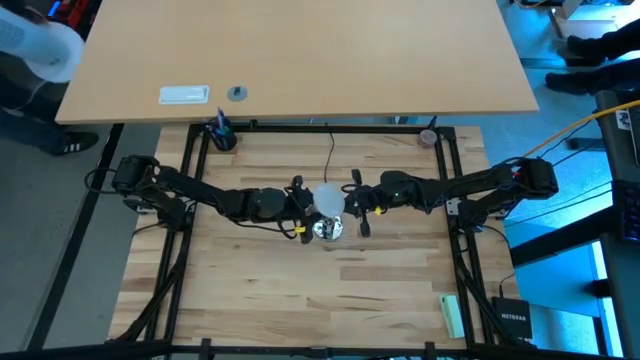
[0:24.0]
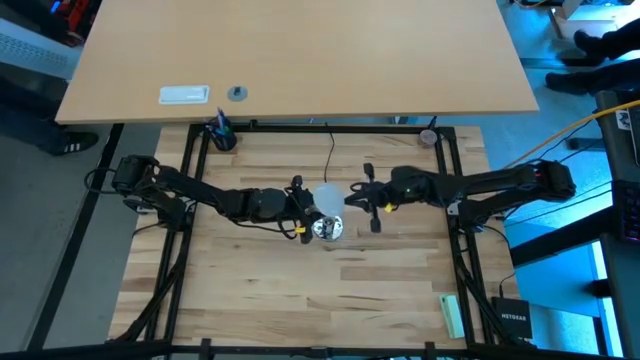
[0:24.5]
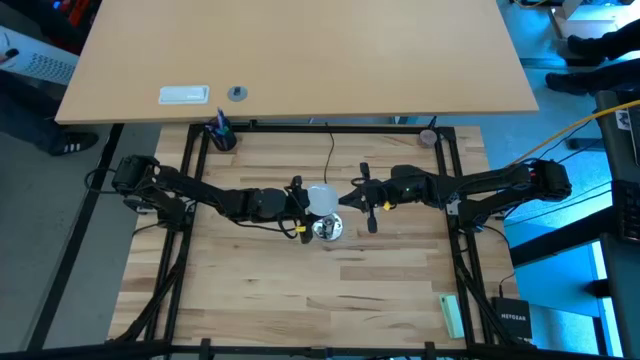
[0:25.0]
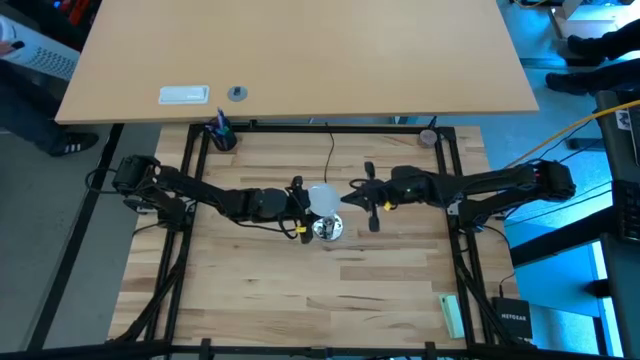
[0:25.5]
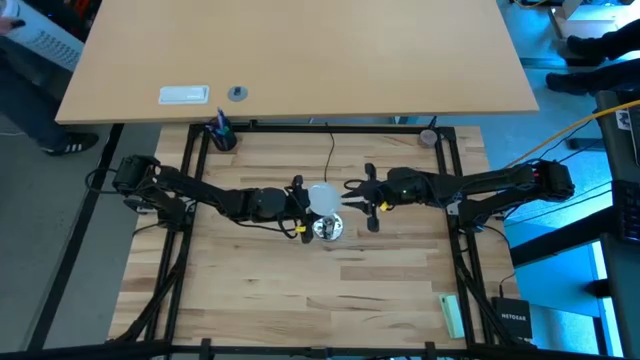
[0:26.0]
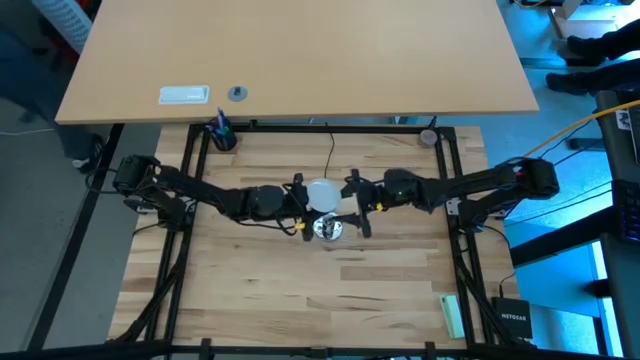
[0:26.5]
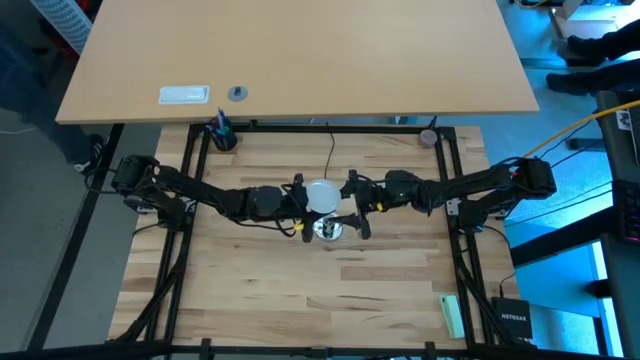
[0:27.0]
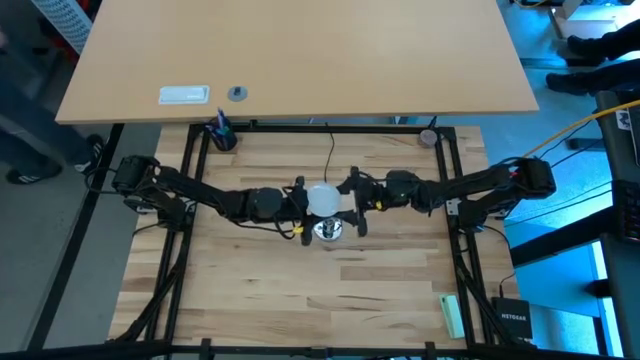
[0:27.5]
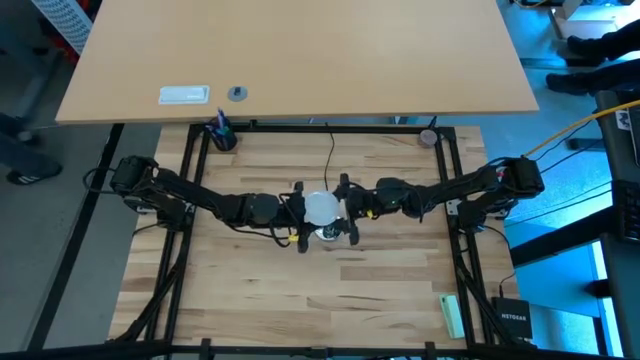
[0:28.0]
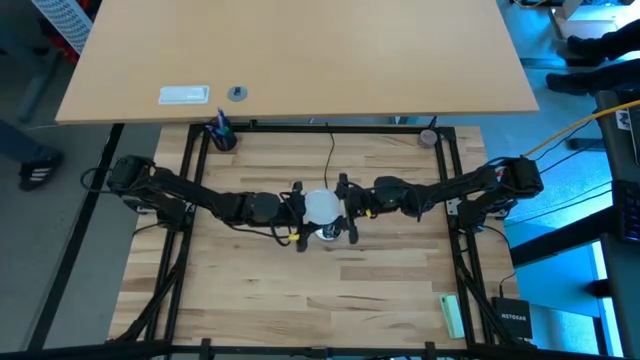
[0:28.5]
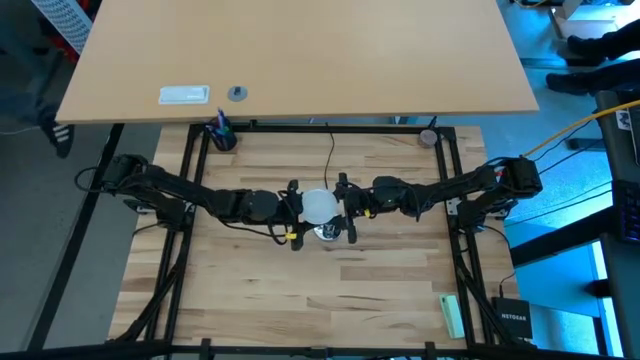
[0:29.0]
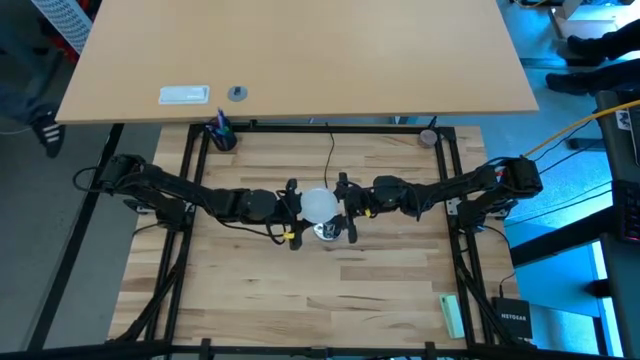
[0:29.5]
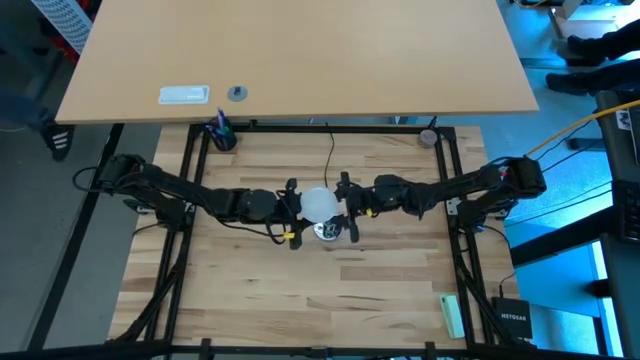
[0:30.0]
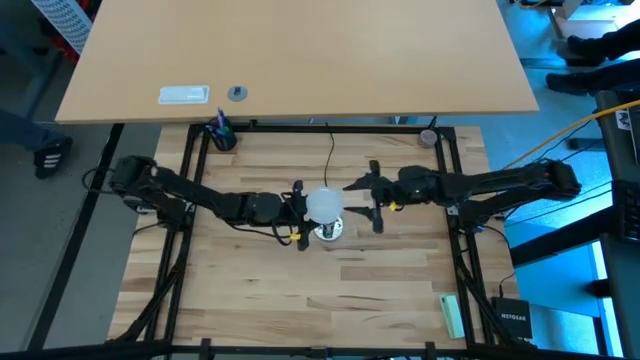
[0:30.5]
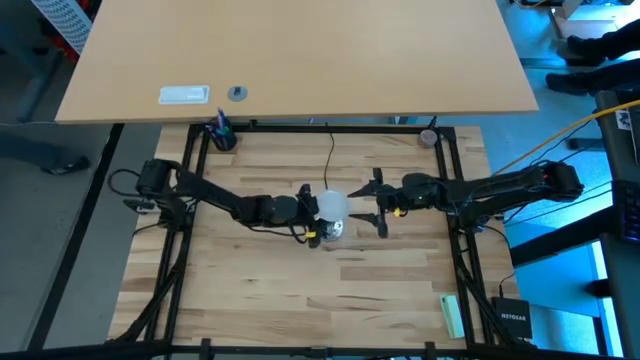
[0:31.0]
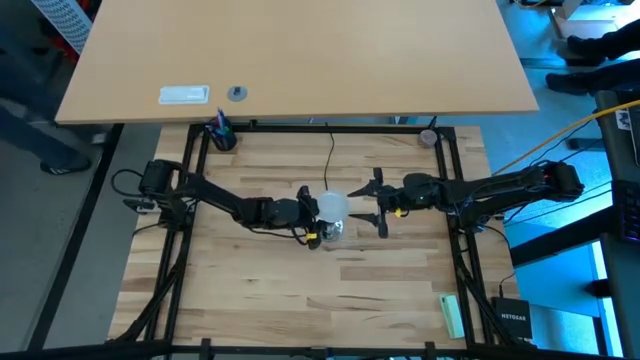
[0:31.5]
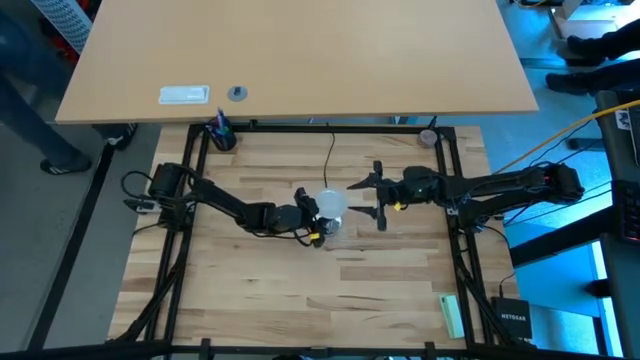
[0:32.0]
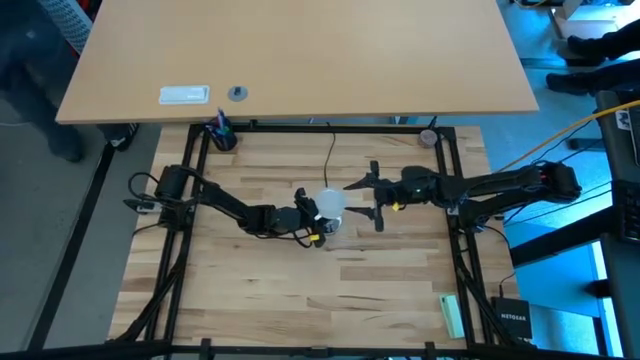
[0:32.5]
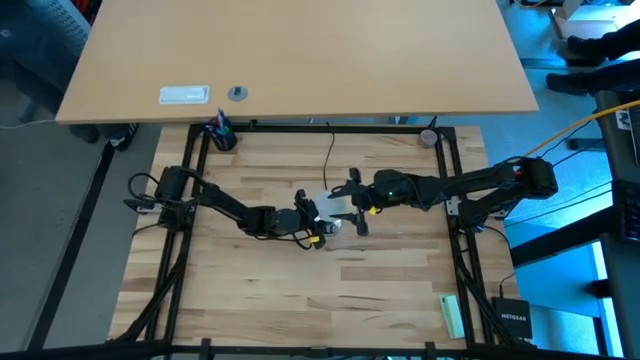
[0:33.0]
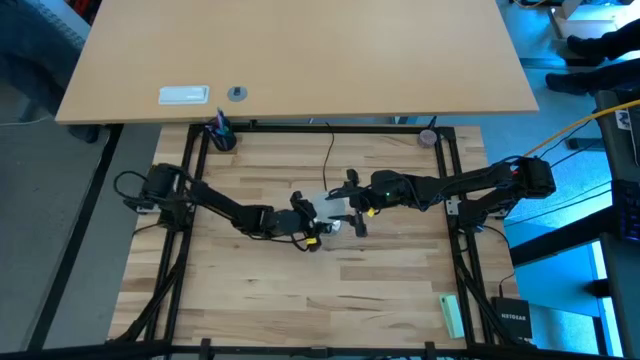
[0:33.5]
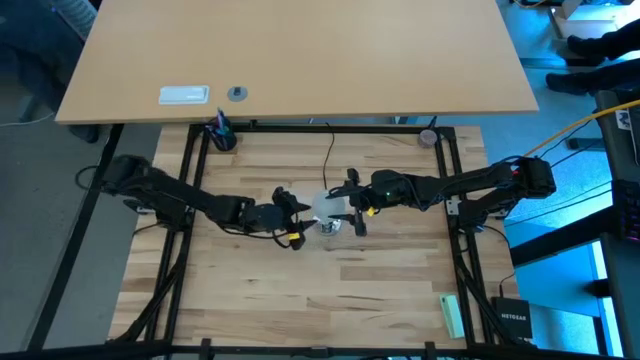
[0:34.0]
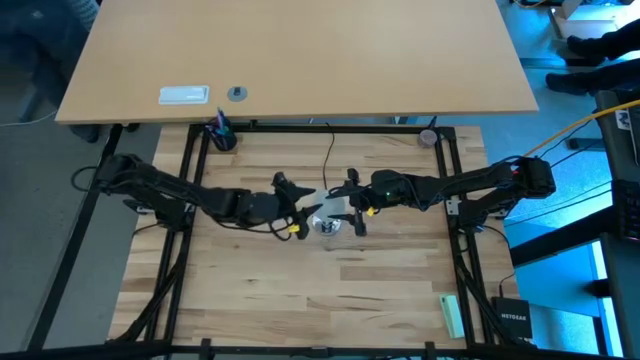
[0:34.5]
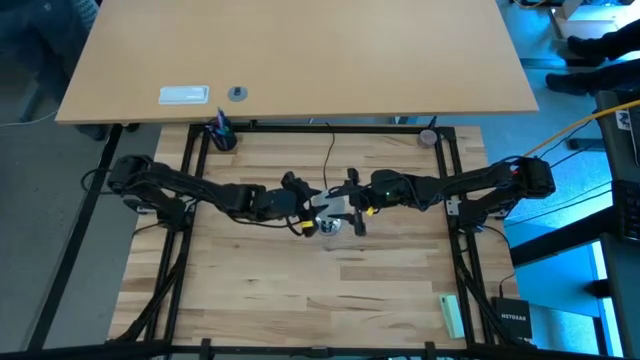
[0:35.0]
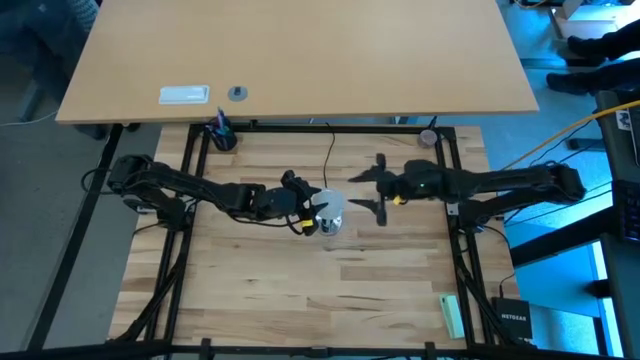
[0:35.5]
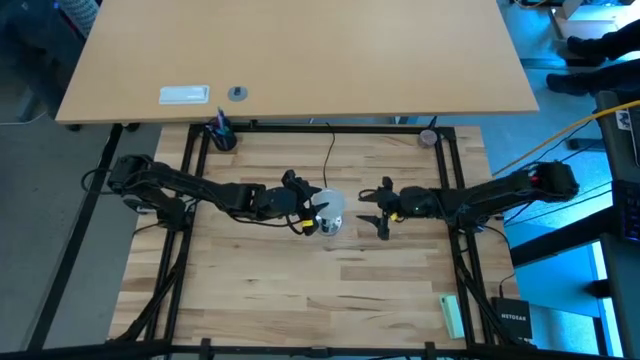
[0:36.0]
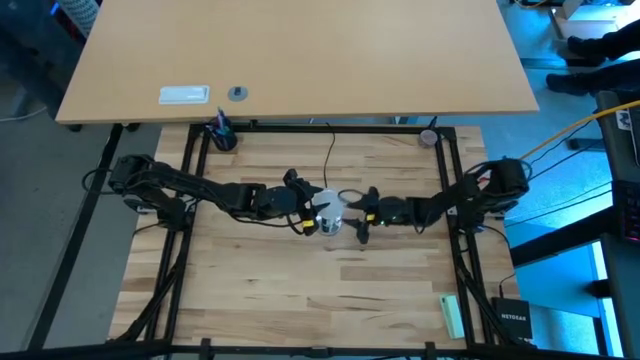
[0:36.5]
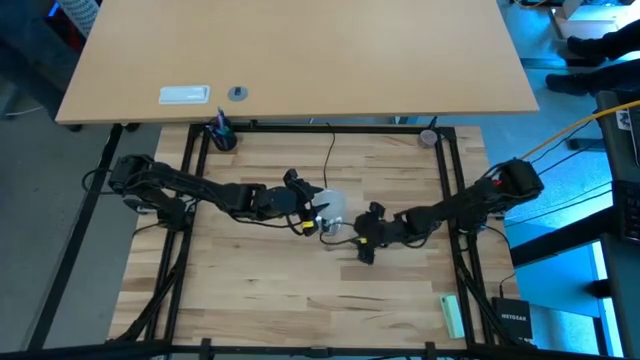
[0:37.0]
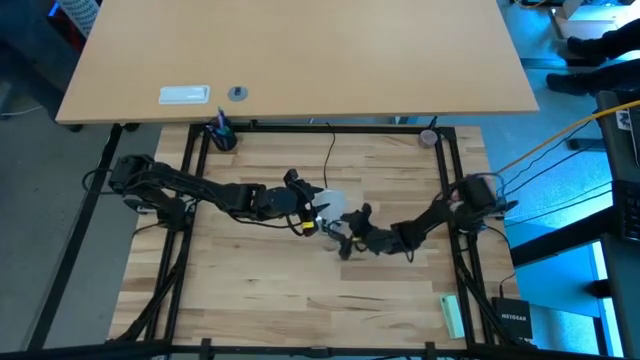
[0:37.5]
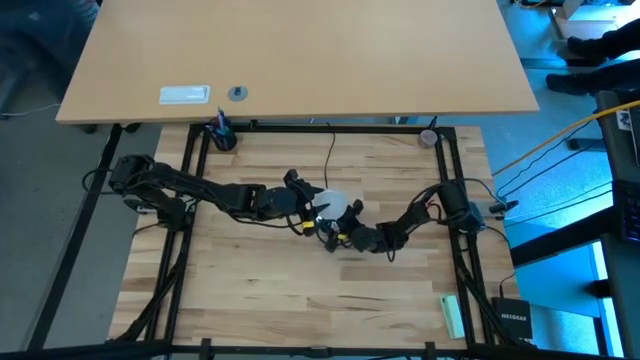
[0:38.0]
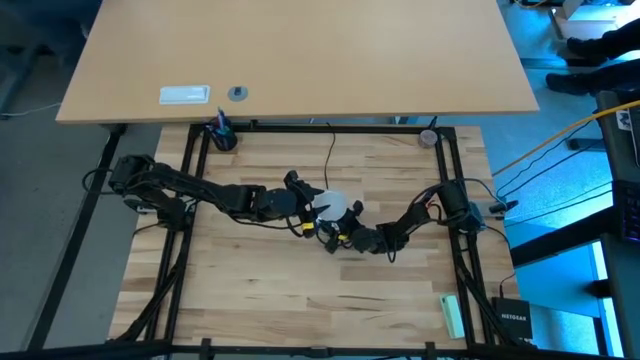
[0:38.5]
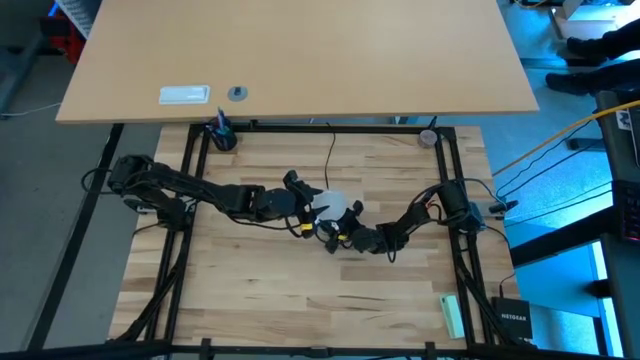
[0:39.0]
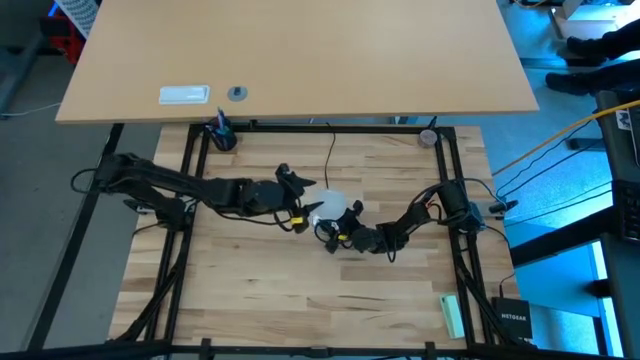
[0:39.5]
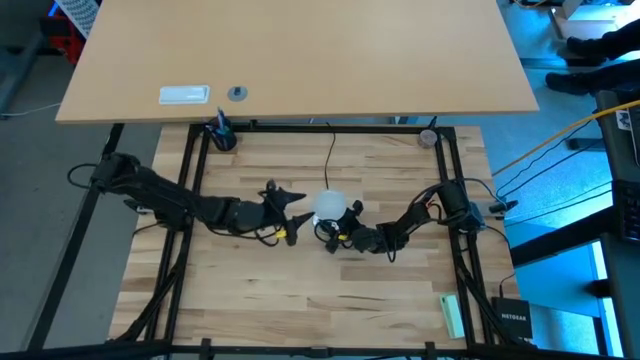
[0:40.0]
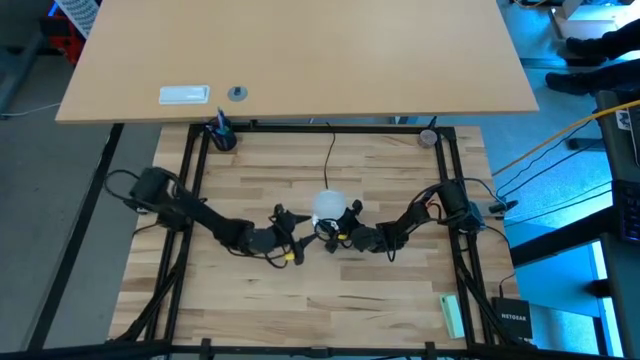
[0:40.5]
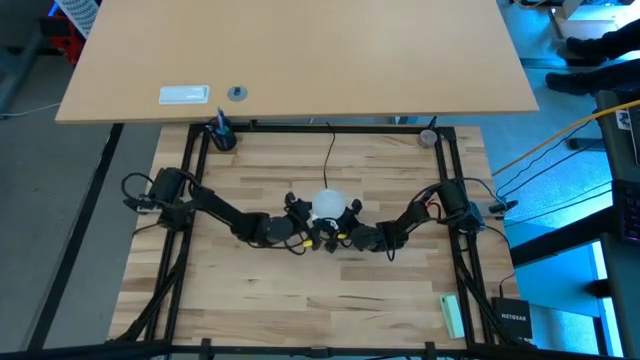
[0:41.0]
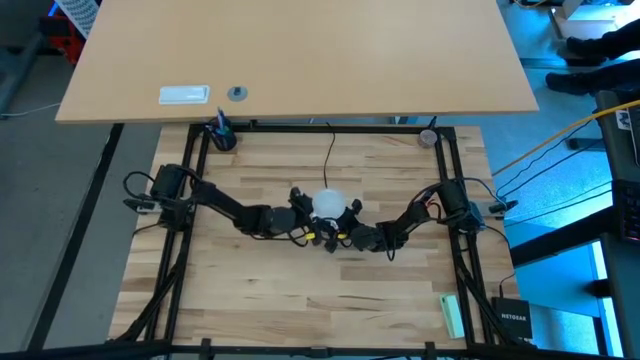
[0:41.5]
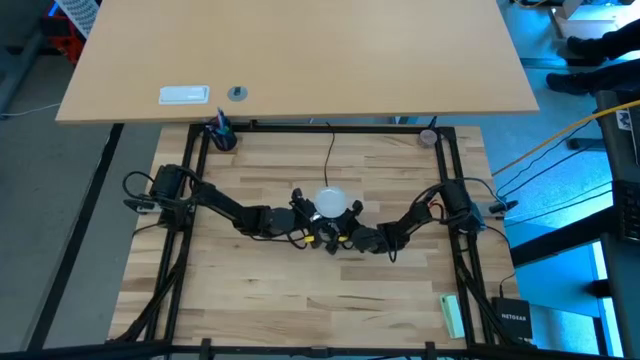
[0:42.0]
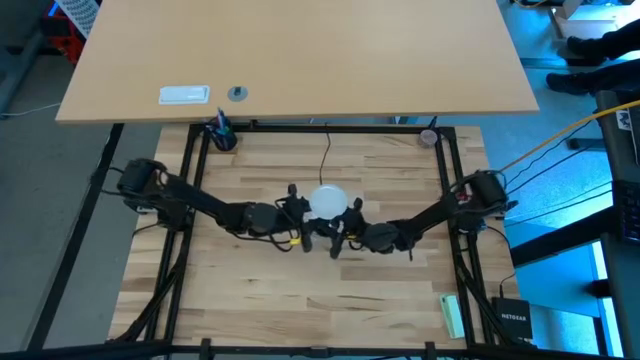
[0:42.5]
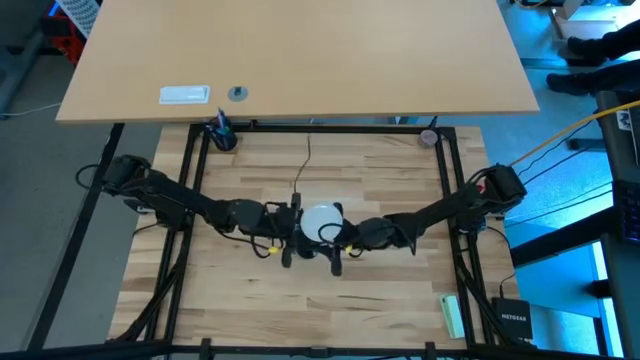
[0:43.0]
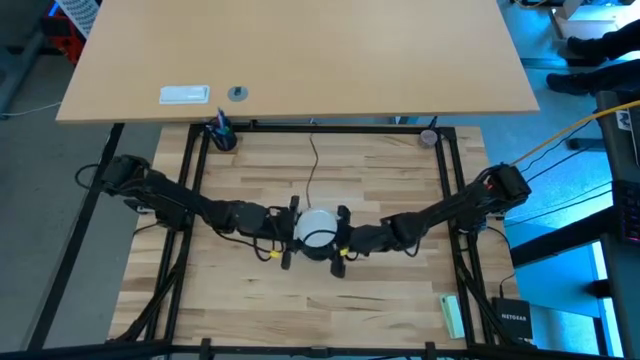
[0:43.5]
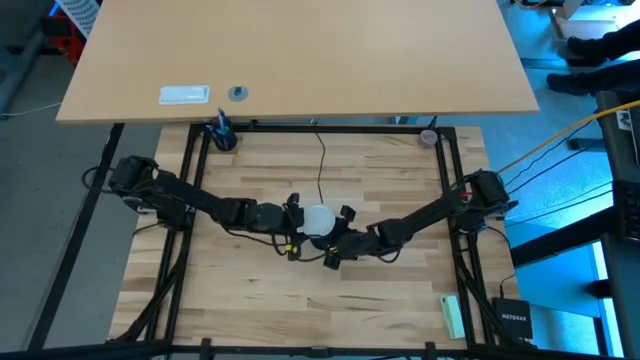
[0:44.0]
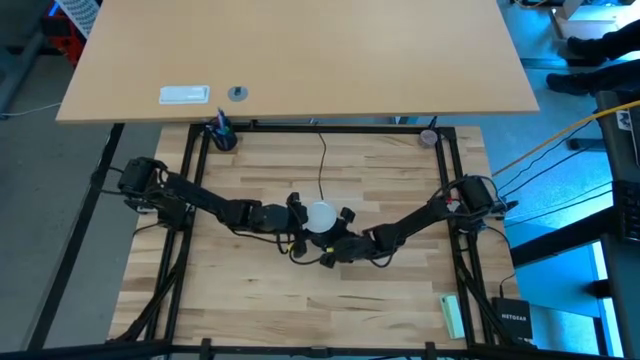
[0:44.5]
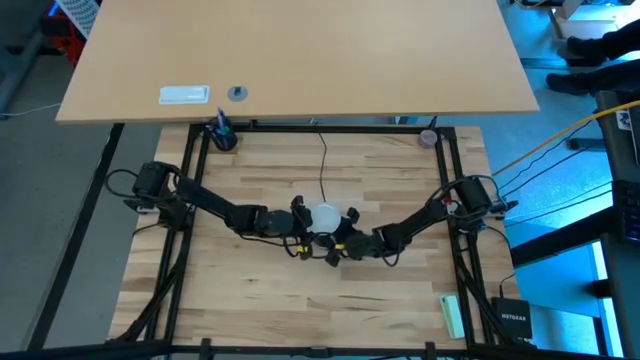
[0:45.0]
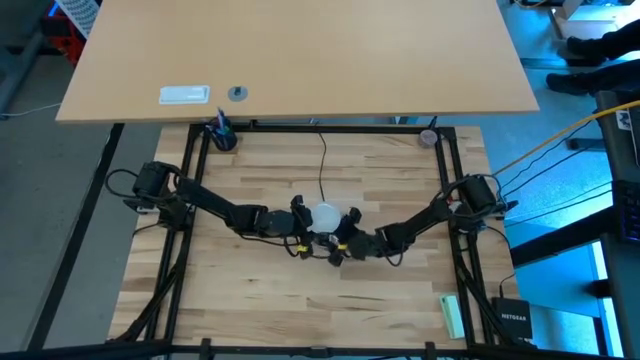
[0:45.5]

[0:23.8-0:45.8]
Task: Screw lightbulb
Insert the lightbulb on the lamp
